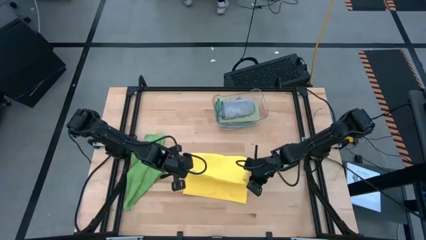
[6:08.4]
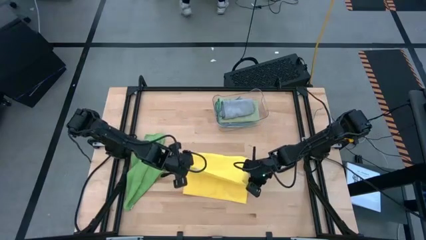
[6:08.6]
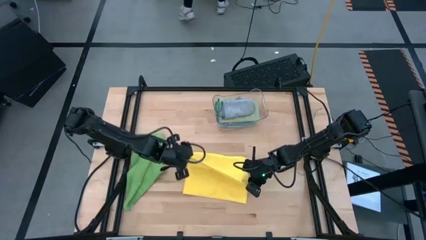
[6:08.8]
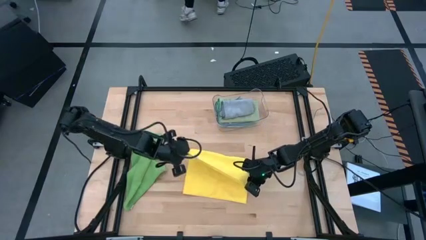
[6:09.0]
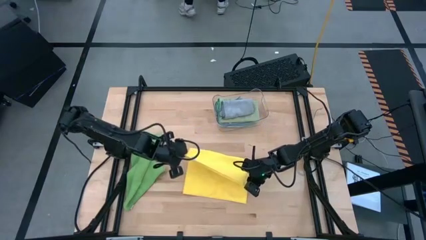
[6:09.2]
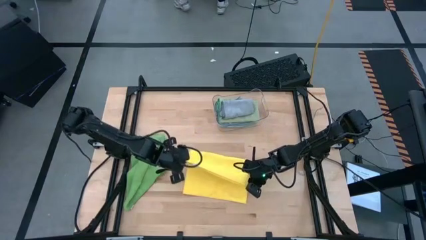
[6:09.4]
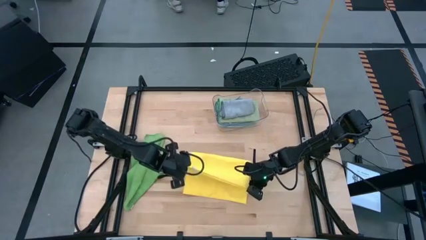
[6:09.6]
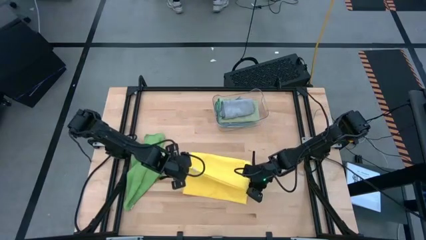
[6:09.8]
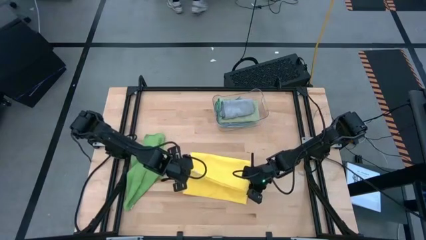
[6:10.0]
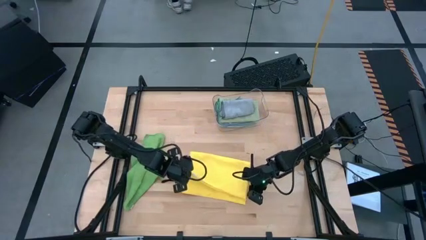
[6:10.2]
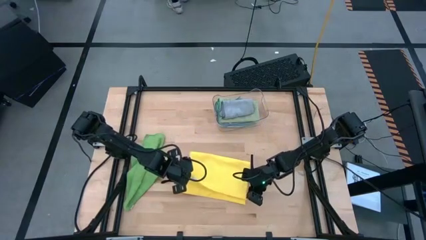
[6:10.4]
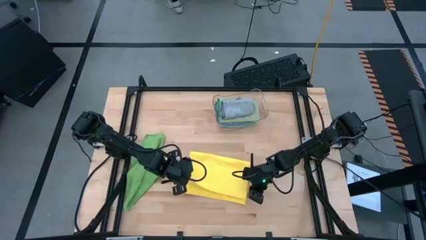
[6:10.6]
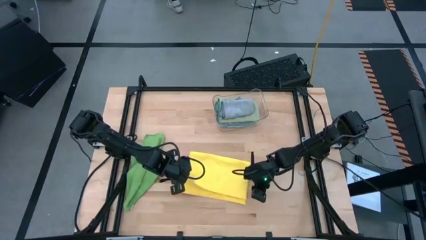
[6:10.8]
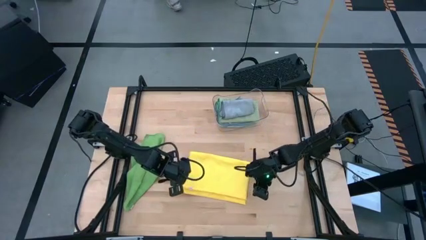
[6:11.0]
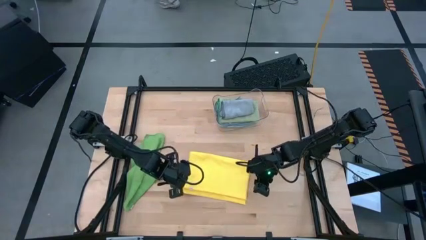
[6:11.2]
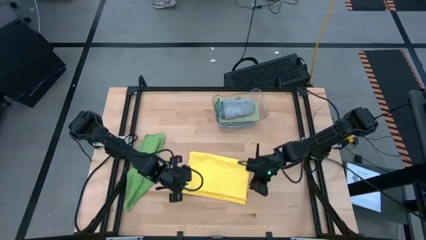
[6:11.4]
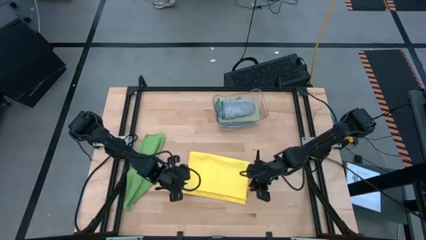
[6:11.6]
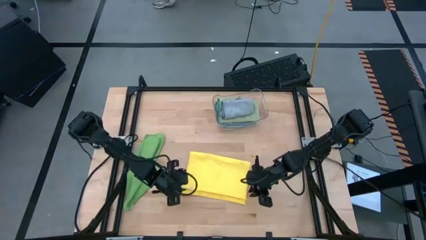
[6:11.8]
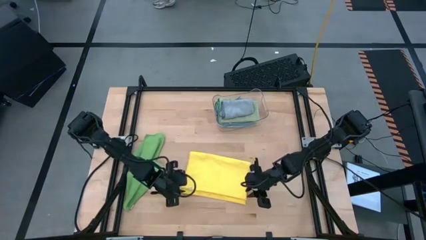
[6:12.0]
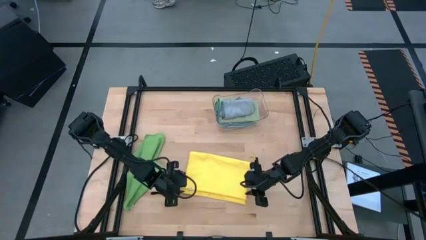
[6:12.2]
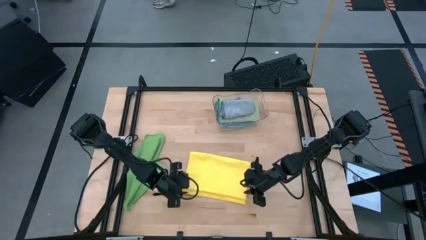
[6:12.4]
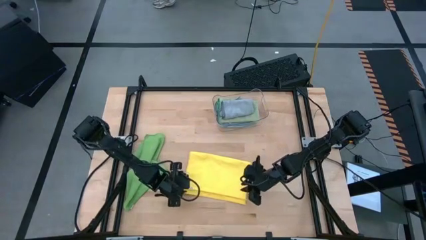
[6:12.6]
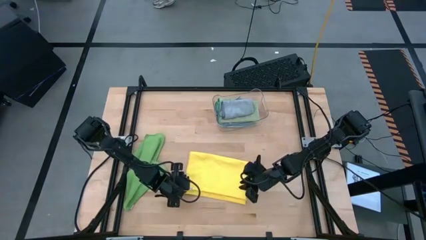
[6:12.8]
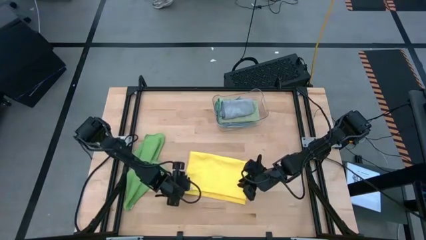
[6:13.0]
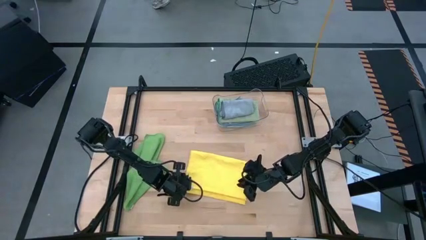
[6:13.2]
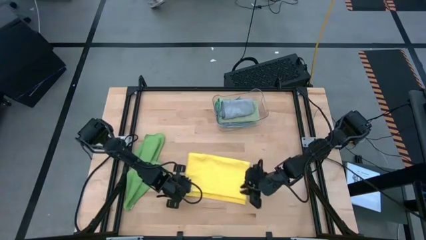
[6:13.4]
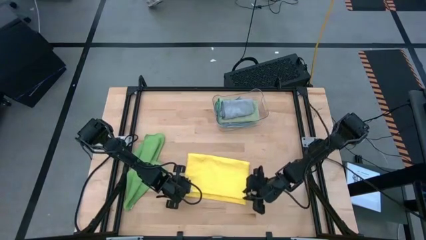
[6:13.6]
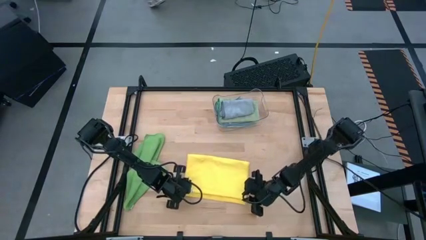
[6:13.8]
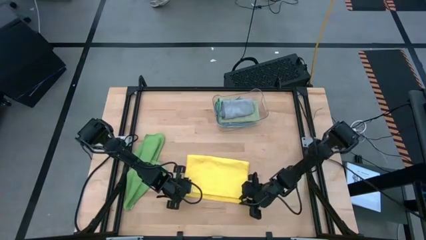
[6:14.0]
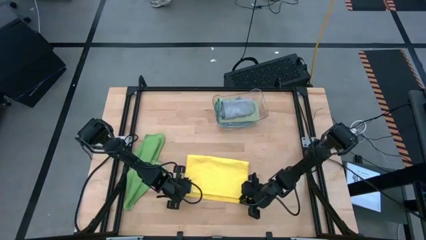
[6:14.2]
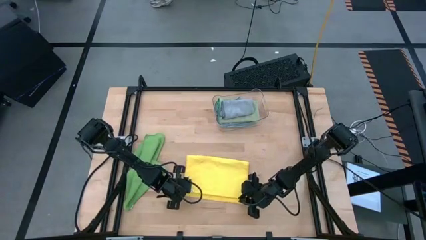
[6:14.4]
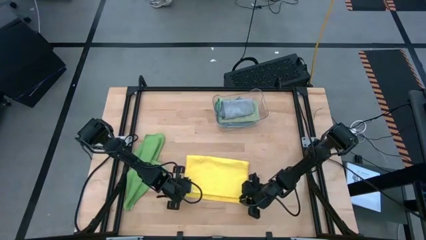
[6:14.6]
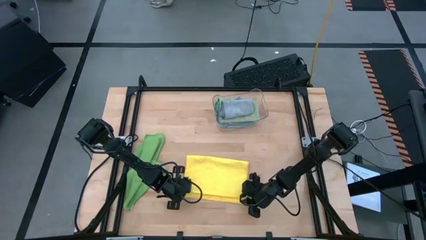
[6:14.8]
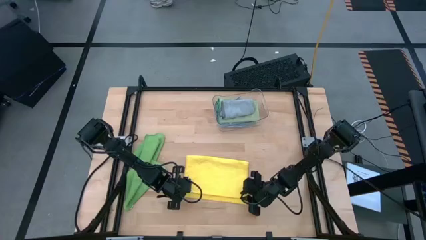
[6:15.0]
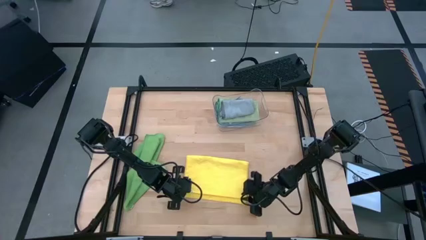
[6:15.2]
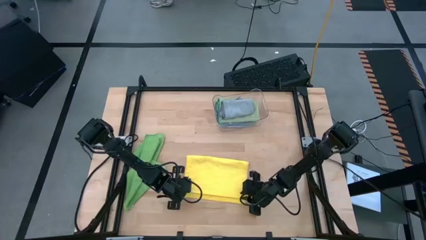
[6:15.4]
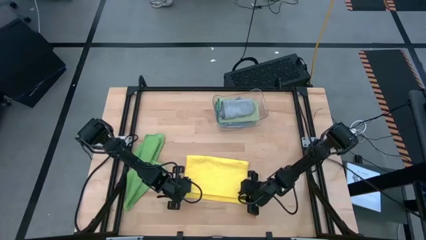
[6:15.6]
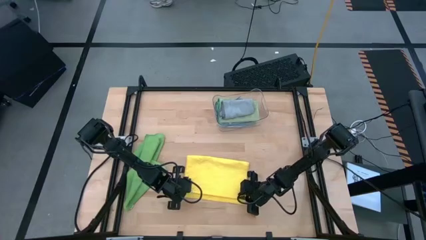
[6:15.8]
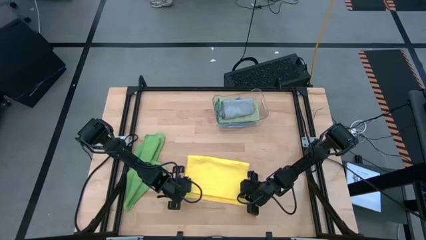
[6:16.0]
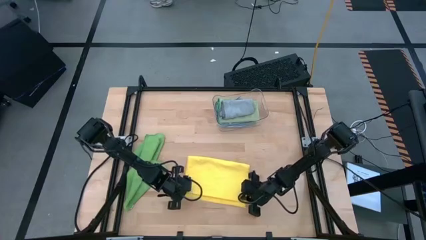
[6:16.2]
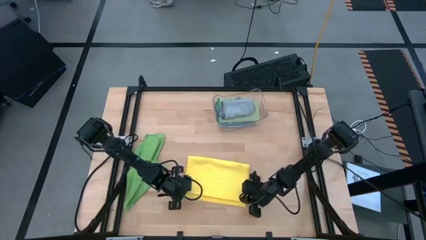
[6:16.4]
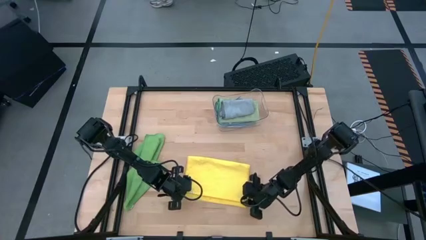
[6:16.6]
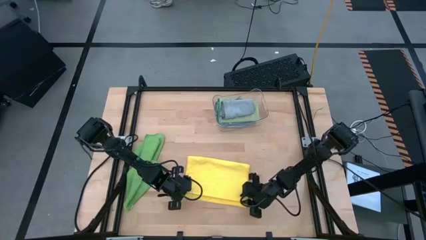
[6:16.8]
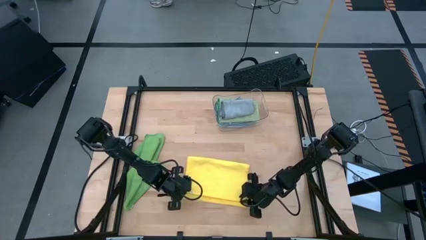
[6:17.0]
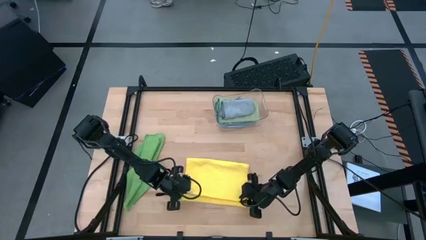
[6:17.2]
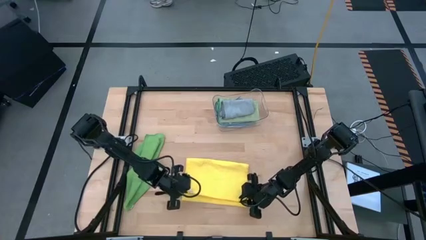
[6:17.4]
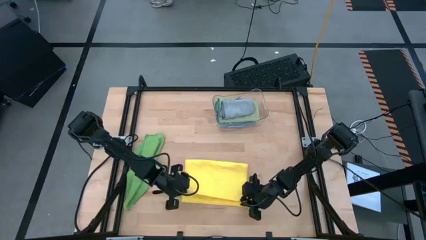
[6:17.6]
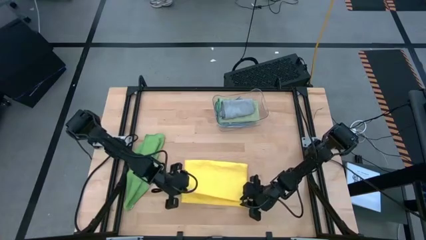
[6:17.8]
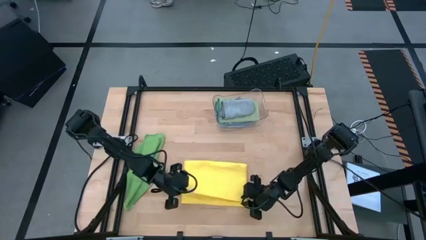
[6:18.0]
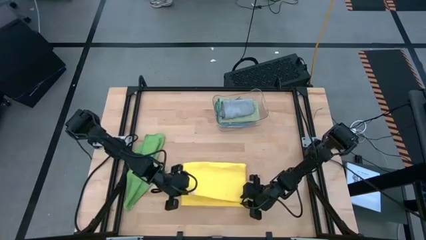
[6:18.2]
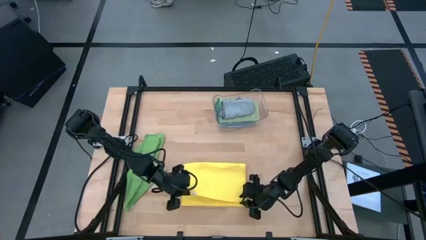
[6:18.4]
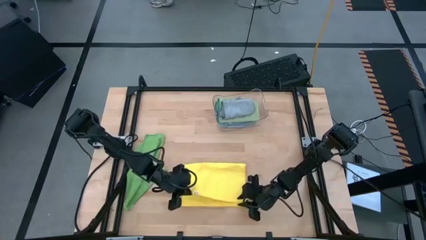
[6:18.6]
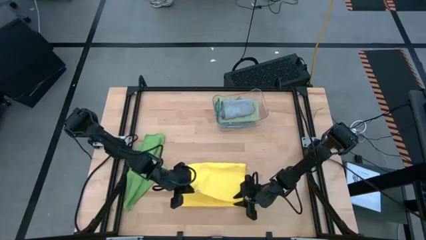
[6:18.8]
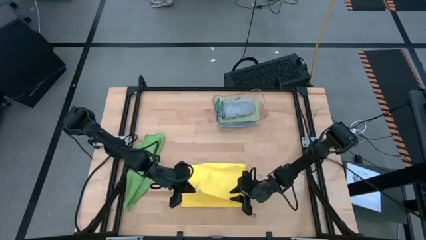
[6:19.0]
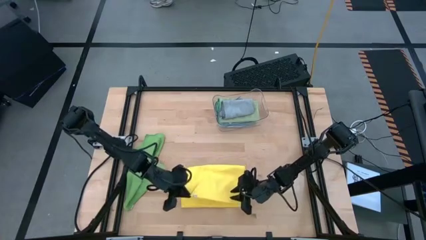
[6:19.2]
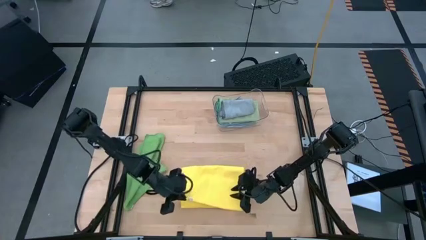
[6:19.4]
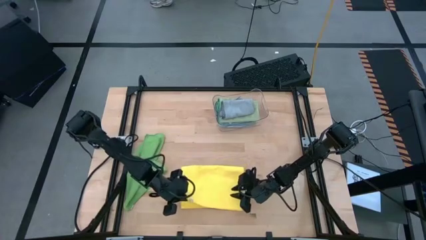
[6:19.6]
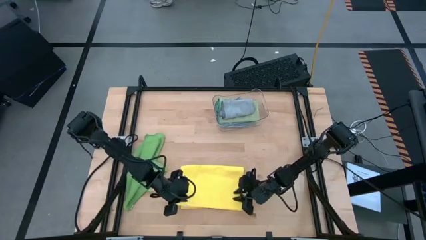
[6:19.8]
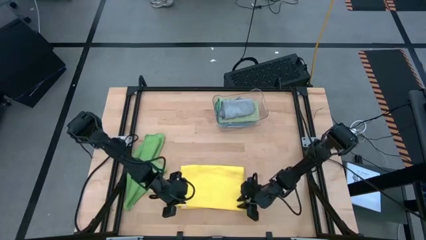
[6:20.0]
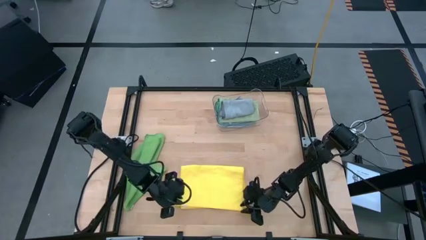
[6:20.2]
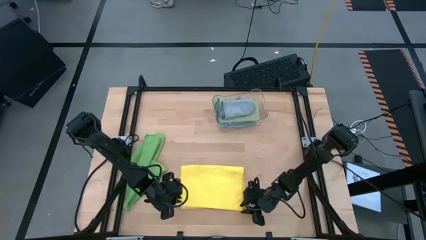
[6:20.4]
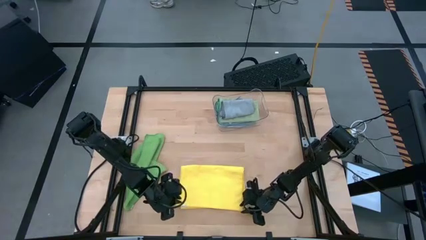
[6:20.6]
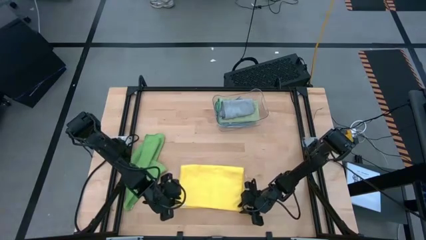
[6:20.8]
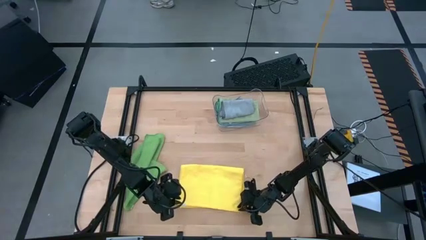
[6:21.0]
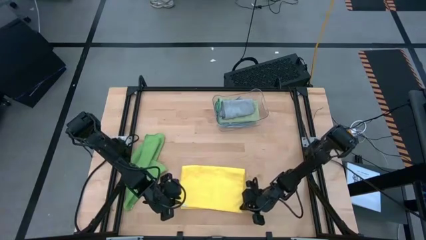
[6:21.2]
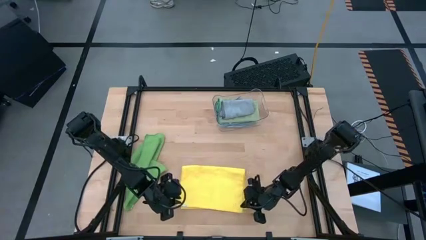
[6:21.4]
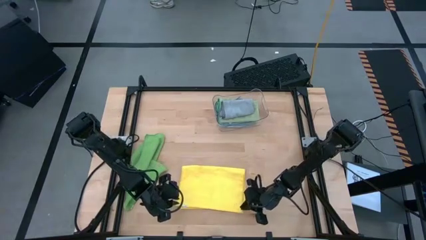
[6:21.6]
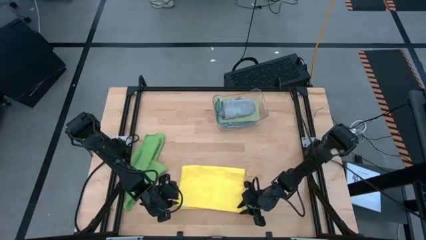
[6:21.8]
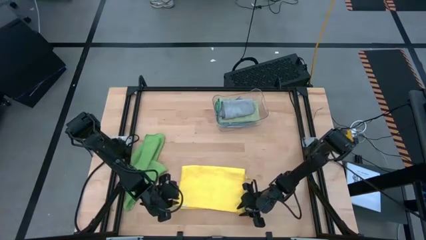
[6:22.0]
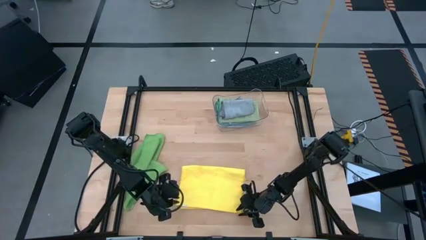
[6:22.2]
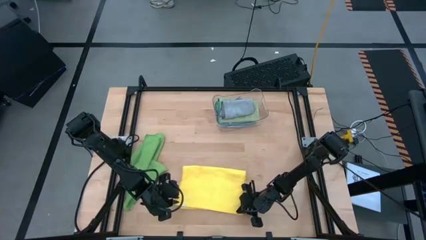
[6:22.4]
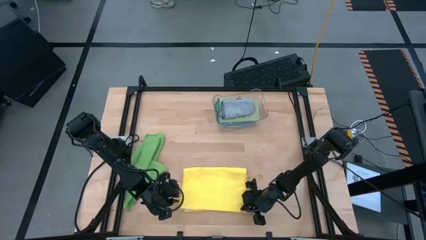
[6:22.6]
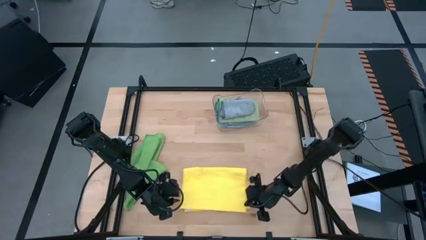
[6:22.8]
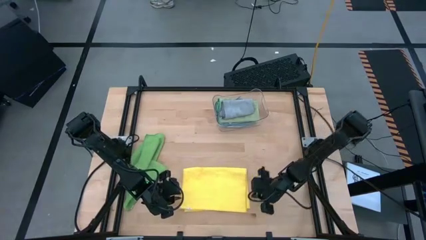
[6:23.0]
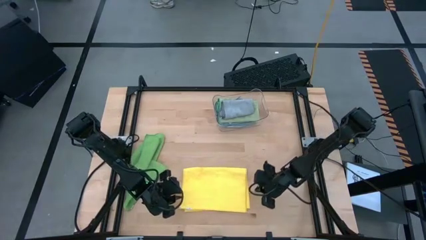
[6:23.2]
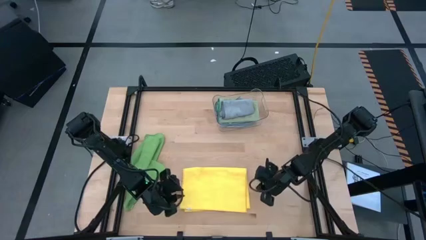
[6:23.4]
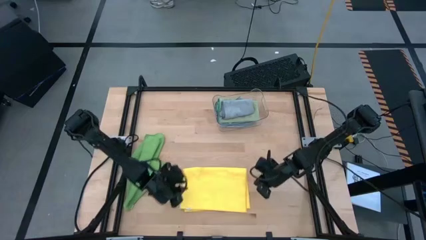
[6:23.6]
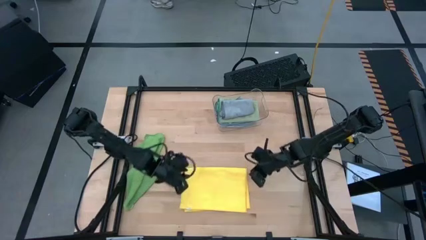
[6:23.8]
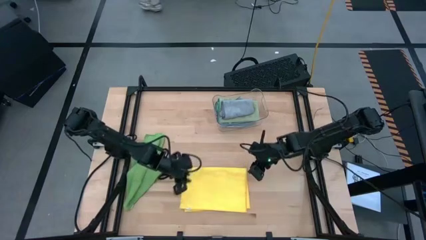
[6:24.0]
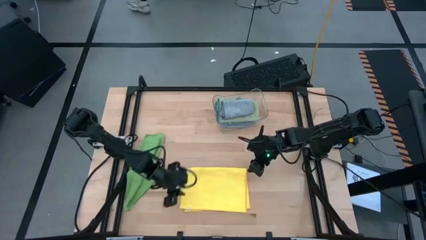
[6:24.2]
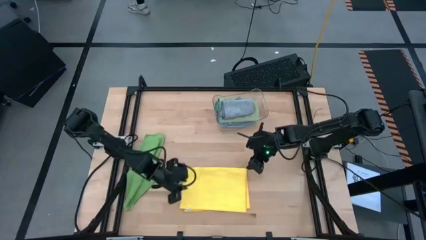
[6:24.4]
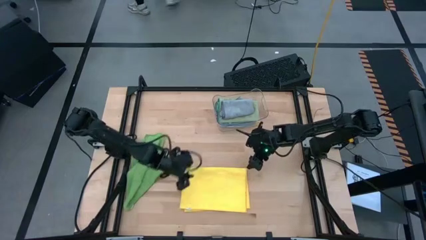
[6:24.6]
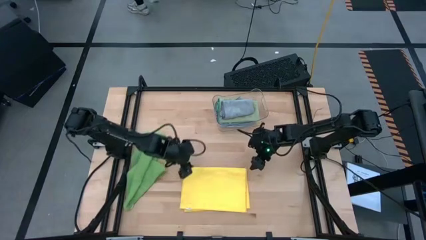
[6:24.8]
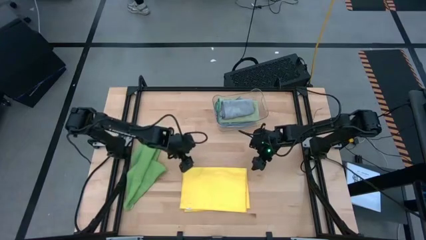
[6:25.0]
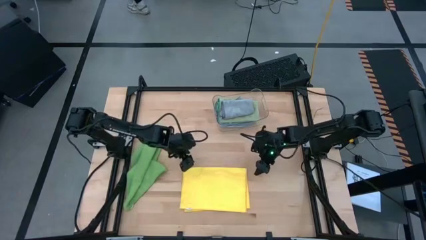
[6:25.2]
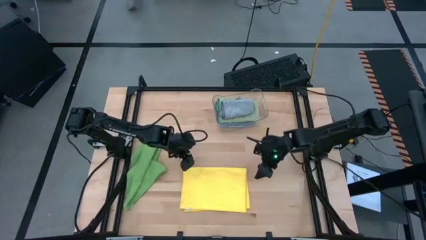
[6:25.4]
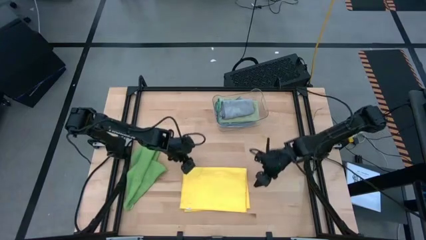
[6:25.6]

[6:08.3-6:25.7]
Task: Fold microfiber towels
Fold the yellow towel
